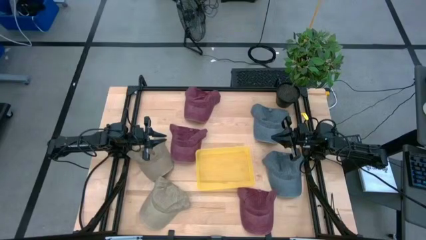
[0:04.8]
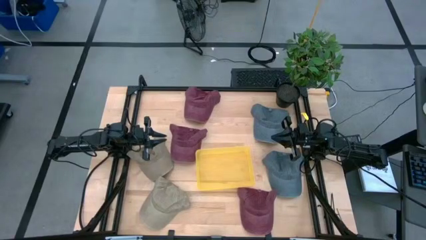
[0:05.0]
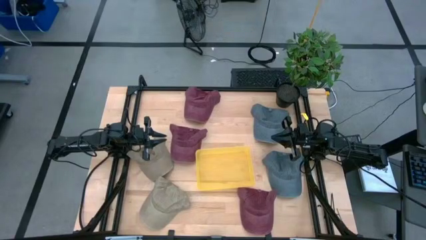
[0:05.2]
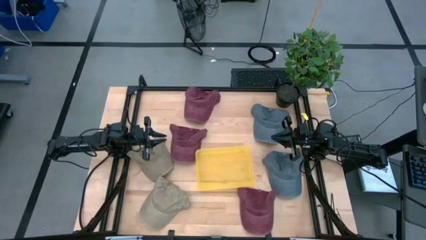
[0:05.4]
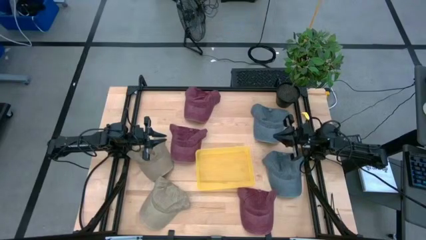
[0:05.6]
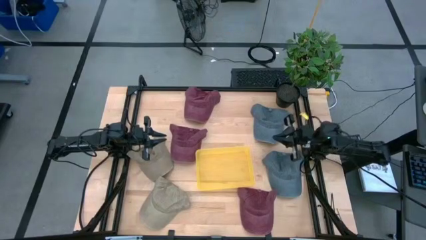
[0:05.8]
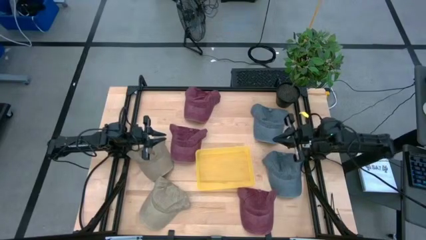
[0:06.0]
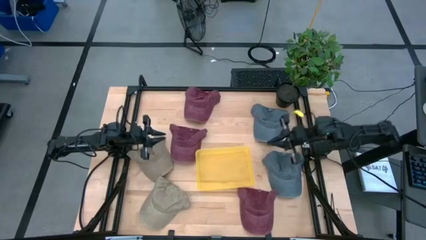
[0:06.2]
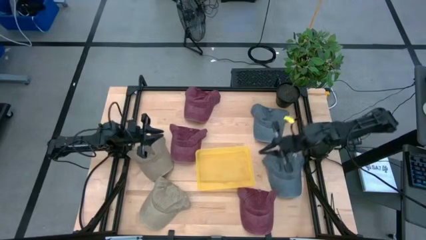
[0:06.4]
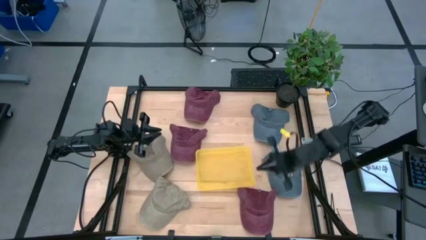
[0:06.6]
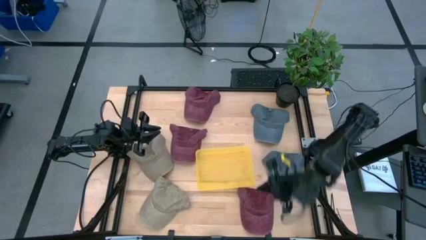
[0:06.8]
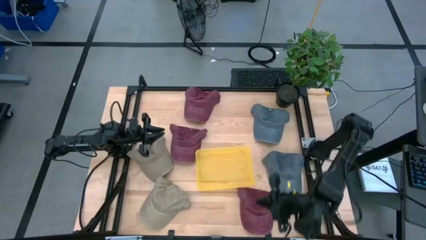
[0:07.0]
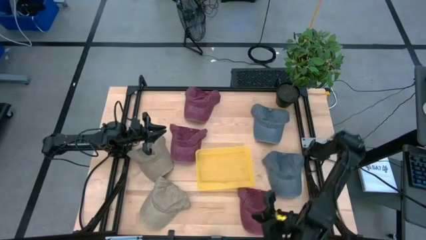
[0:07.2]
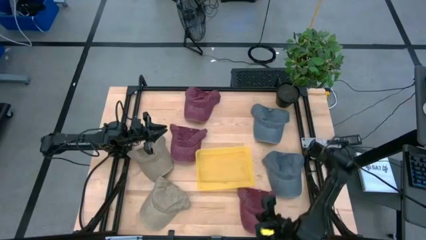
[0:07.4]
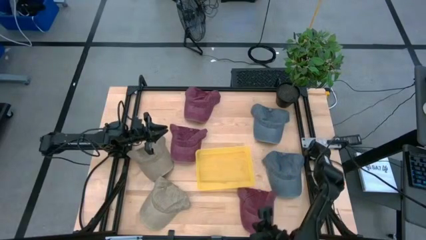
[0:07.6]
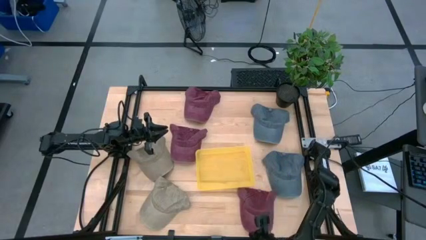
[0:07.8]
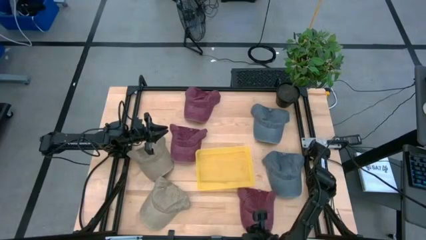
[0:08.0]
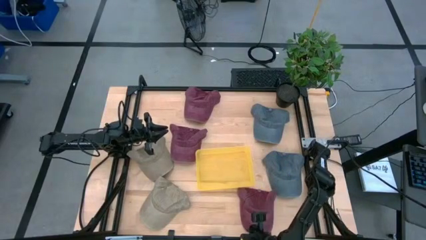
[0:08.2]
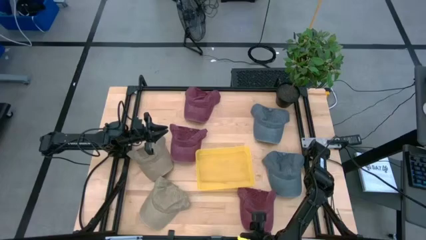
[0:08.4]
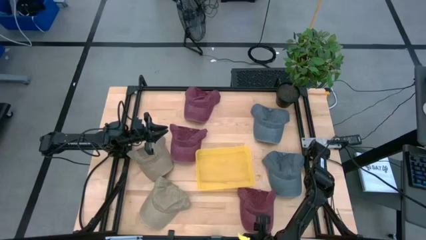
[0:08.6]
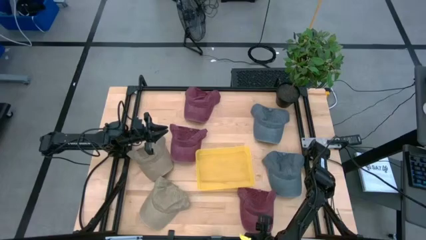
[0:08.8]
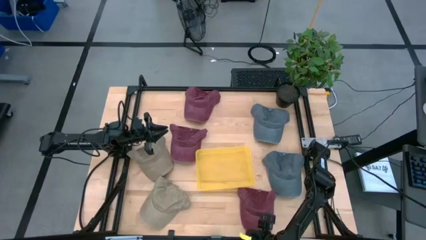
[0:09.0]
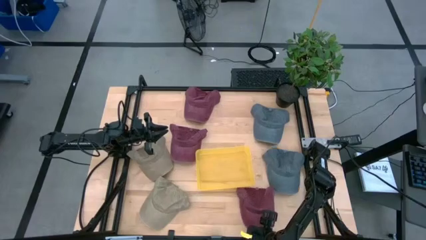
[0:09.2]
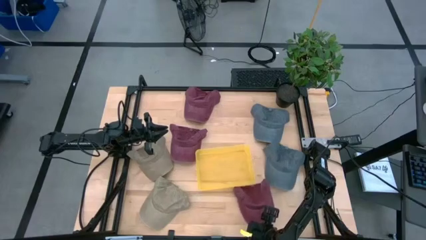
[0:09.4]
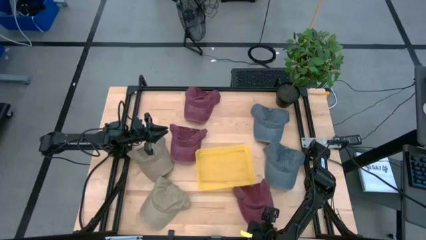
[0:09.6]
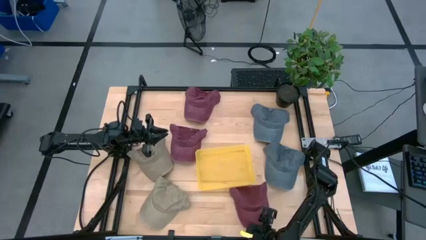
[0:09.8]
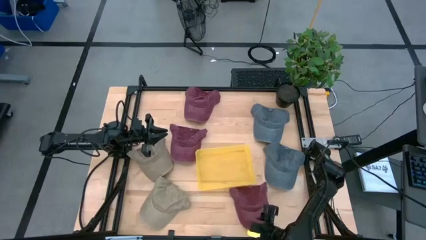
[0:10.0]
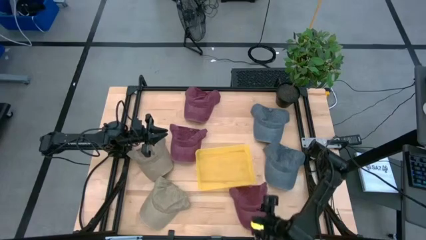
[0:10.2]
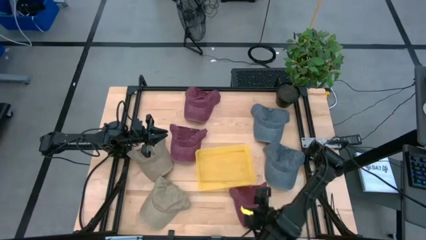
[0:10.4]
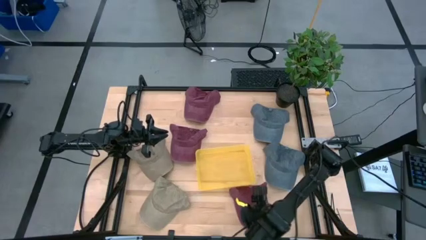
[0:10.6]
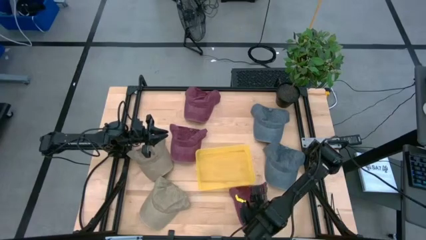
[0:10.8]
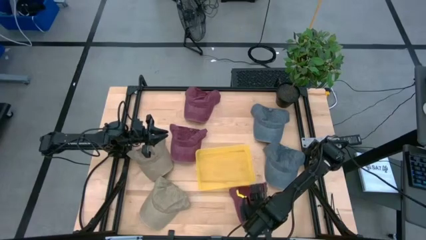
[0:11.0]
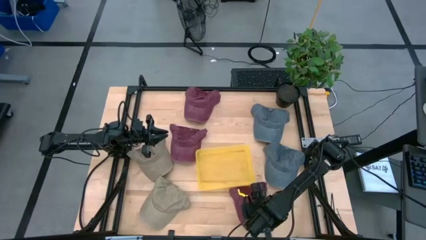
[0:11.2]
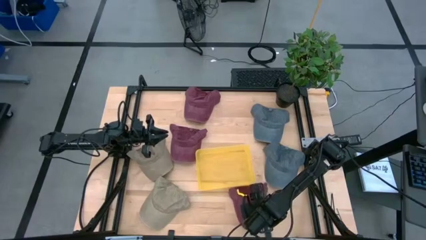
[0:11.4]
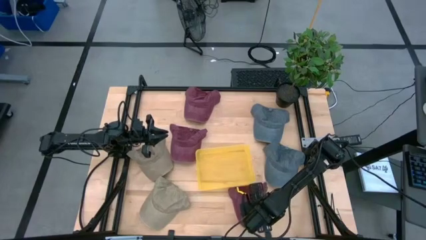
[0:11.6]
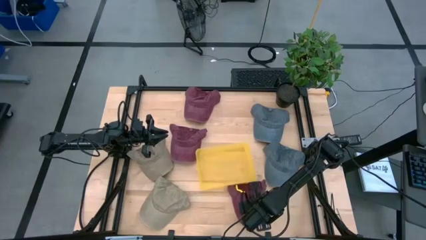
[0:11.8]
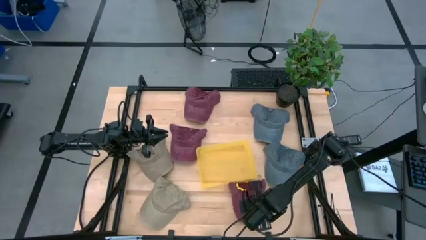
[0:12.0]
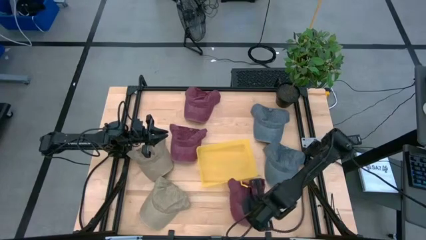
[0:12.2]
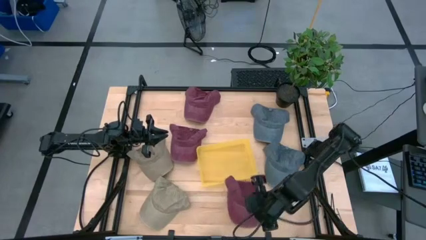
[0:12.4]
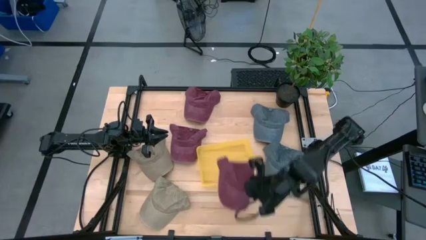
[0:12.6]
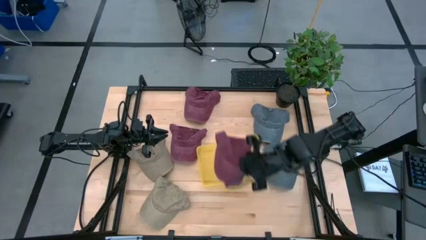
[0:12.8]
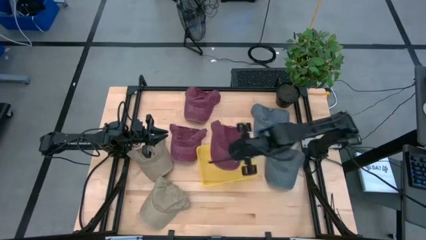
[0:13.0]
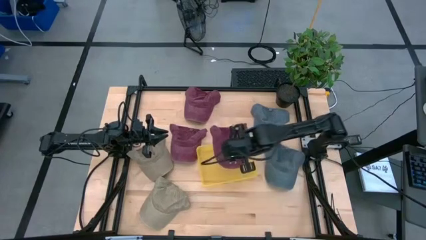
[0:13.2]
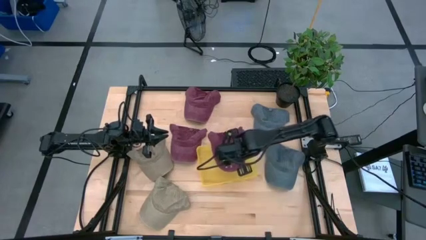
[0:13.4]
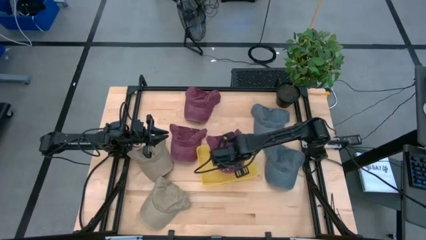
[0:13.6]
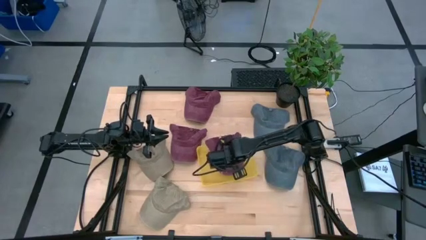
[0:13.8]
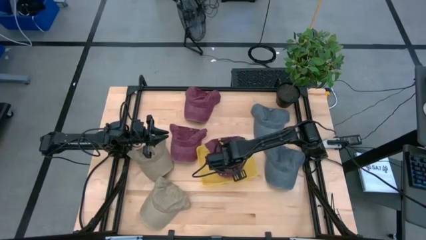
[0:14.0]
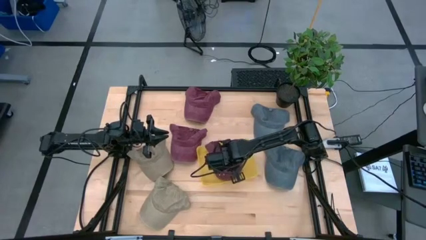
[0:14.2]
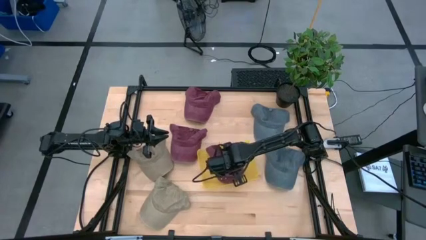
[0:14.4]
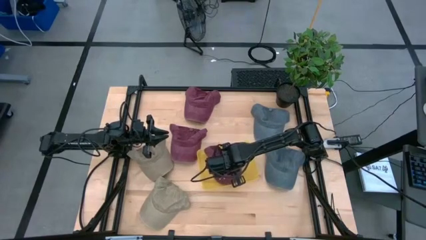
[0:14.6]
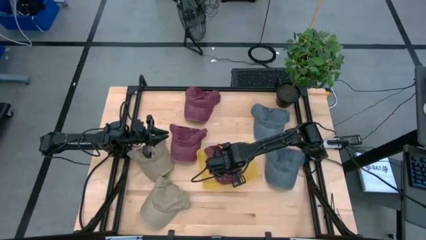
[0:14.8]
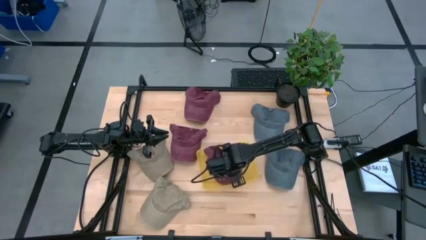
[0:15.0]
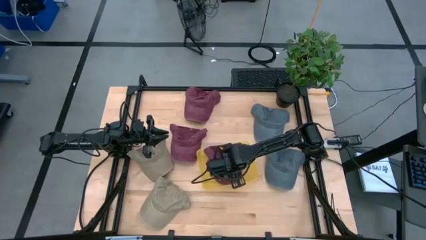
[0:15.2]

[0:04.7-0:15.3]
Task: Pick and place caps into container
Put the bottom violet cap into the yellow container

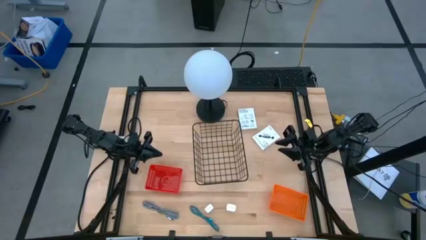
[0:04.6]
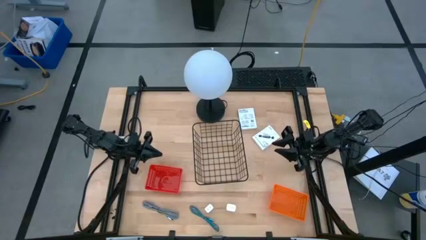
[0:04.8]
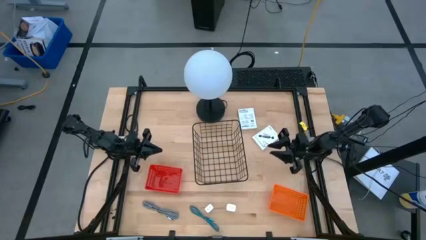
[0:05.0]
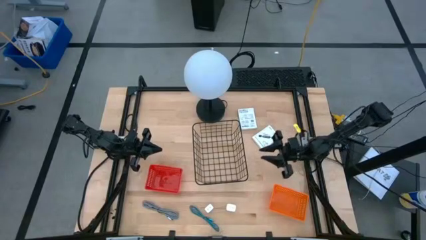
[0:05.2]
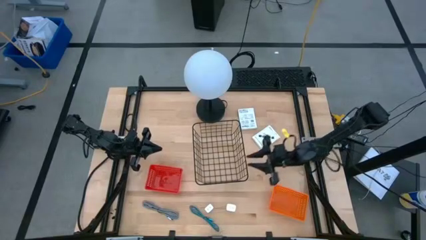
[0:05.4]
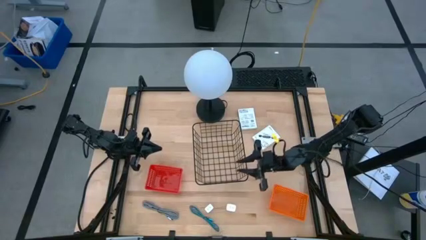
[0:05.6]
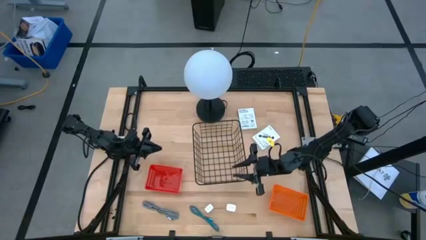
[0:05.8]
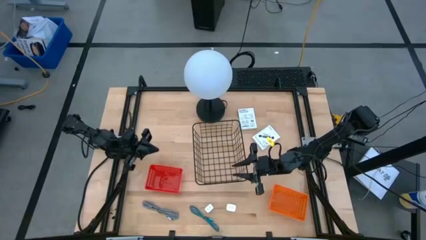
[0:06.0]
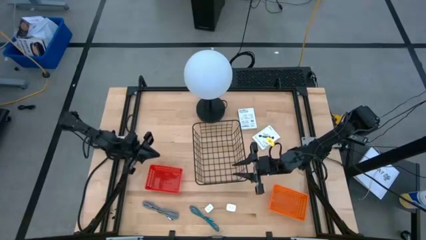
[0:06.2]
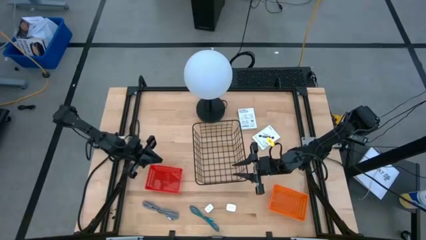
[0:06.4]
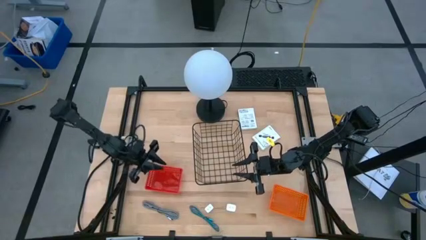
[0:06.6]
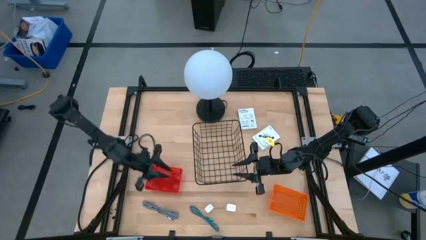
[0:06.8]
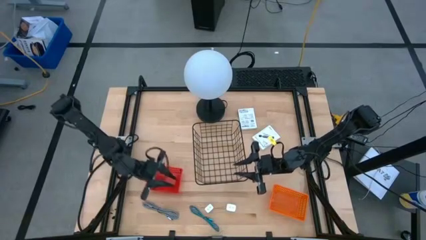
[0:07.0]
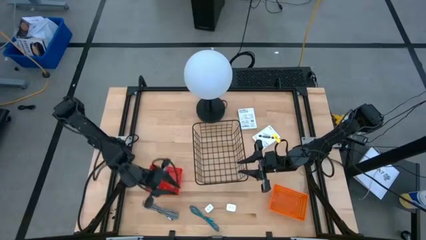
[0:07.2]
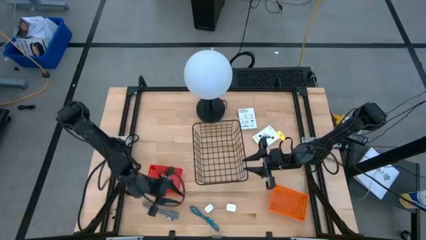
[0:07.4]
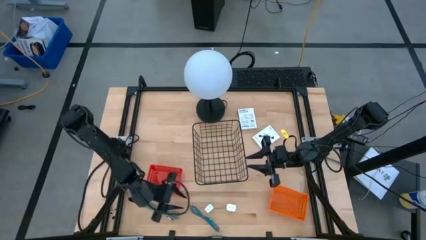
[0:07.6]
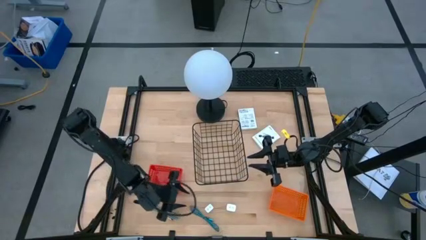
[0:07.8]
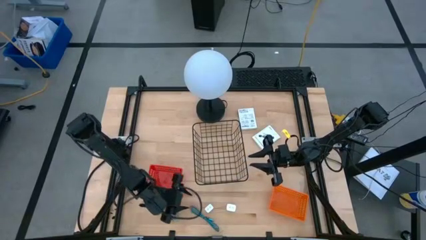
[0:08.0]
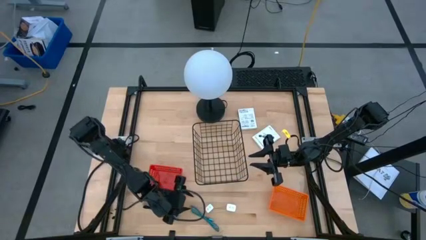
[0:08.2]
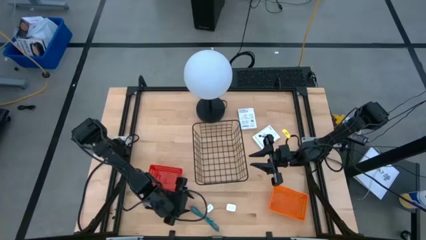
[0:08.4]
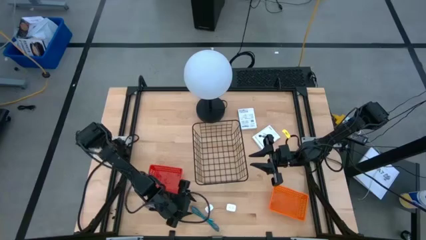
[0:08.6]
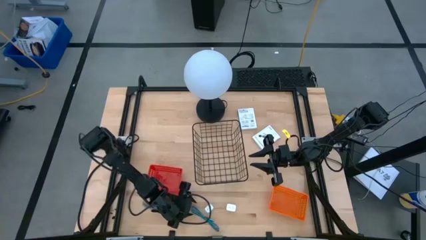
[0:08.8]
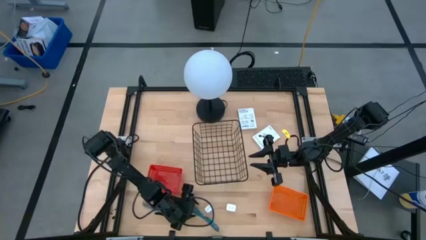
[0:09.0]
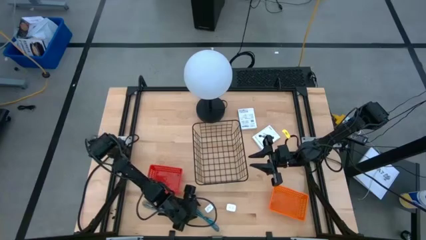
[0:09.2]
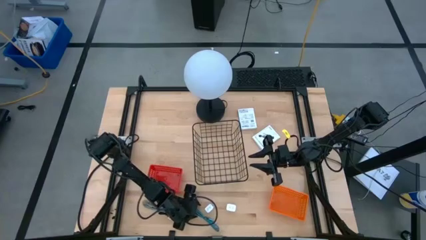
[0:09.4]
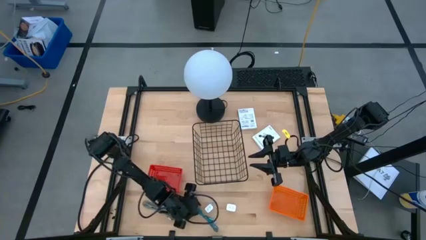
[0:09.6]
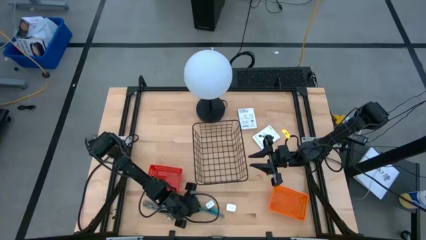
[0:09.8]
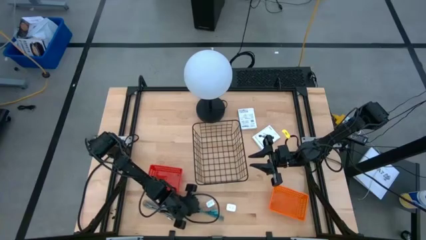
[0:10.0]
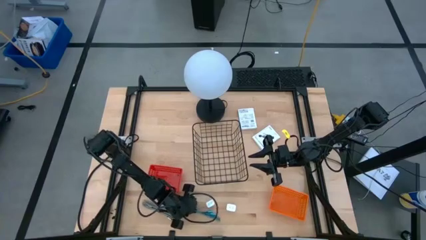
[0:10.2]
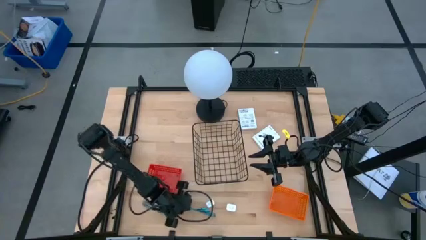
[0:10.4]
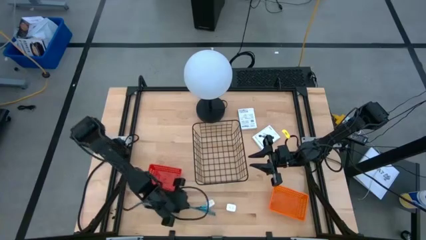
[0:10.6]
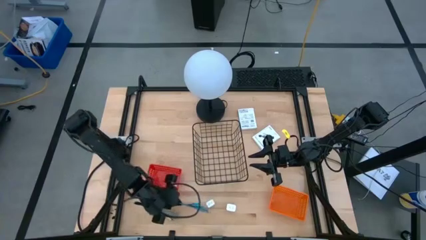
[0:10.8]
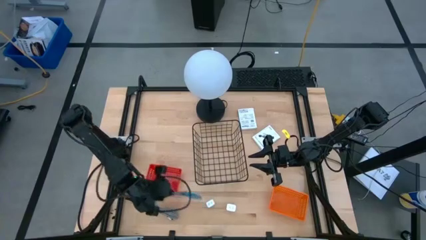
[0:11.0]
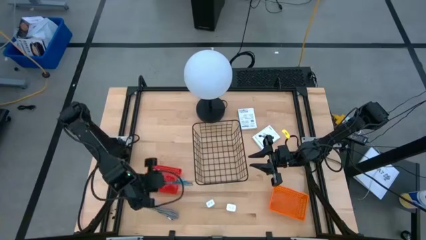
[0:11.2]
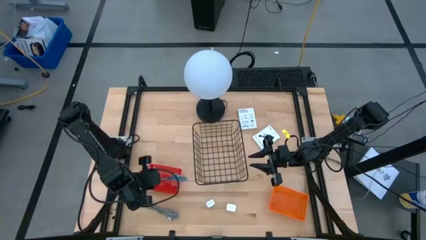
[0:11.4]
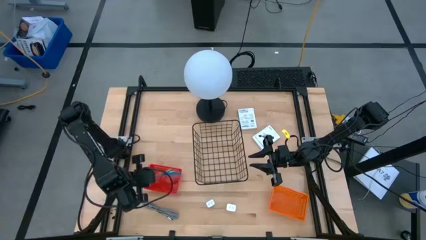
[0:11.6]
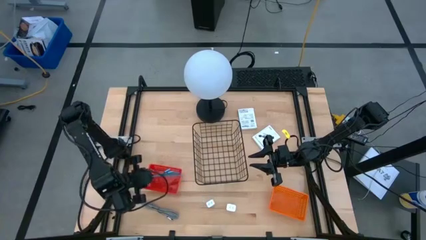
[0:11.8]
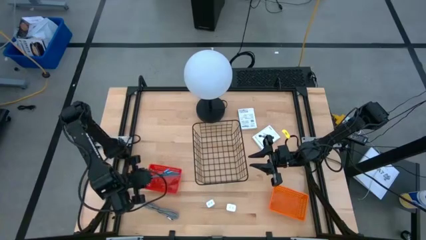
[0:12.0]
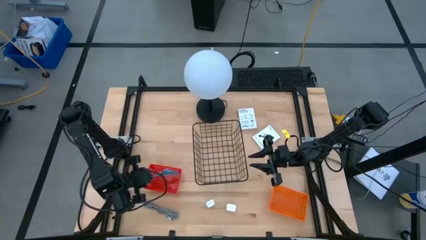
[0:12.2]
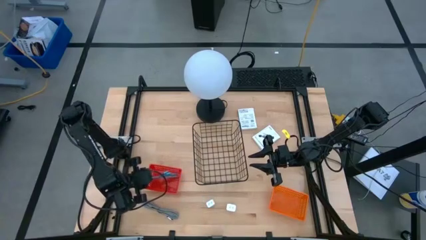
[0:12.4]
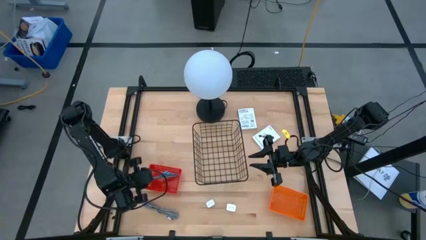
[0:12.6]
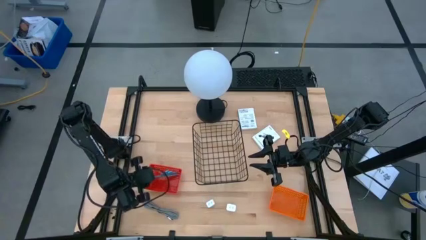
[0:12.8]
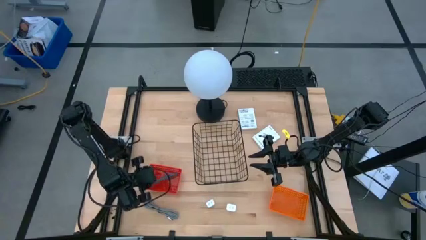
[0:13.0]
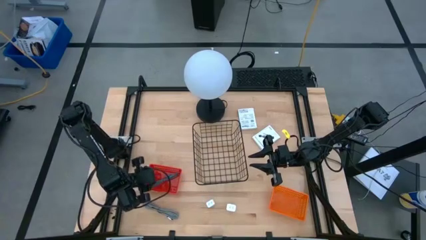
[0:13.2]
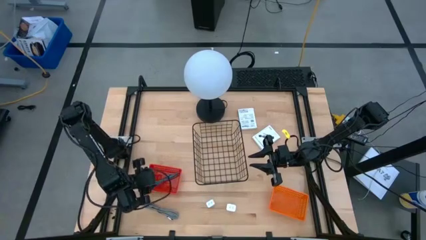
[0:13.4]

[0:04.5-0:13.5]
Task: Pick and place items into bin
Put the blue USB cable wire into the red bin
